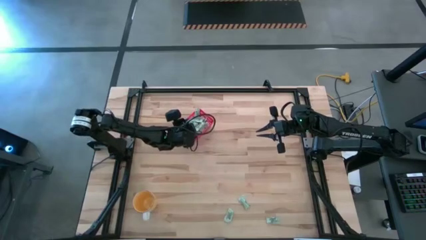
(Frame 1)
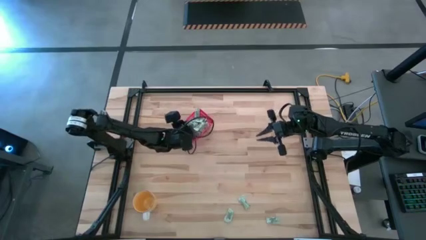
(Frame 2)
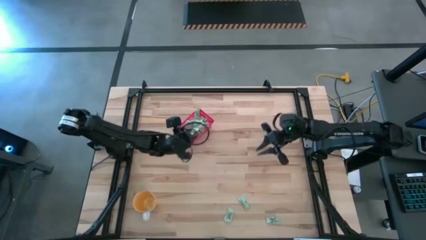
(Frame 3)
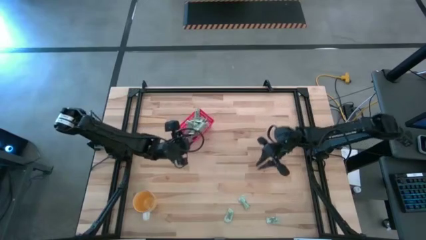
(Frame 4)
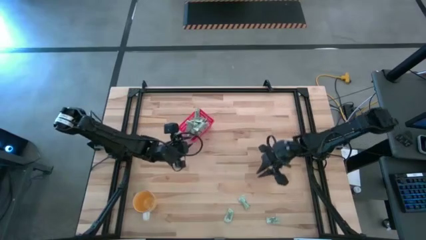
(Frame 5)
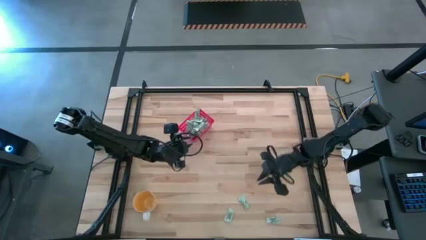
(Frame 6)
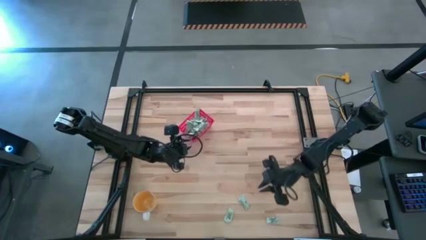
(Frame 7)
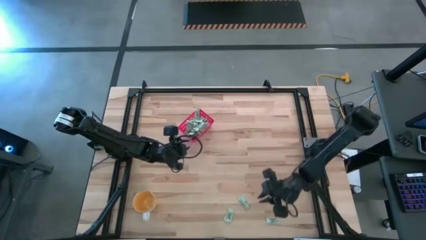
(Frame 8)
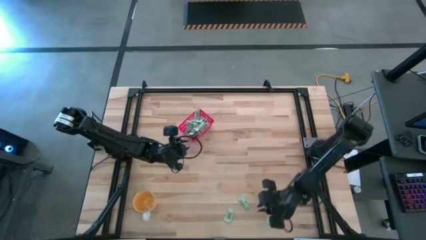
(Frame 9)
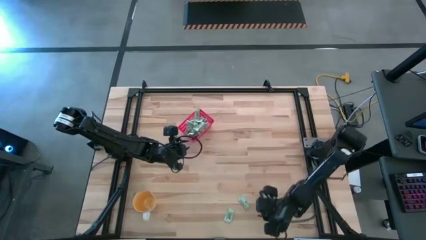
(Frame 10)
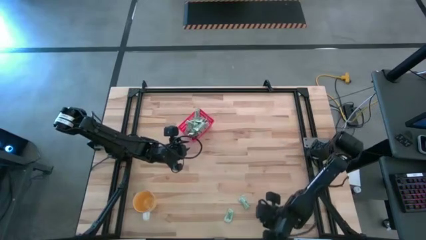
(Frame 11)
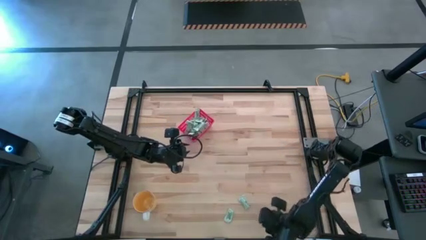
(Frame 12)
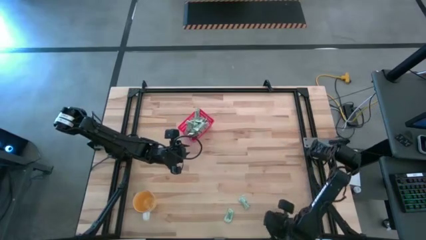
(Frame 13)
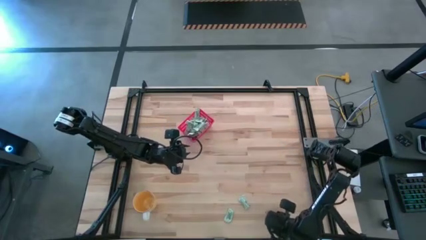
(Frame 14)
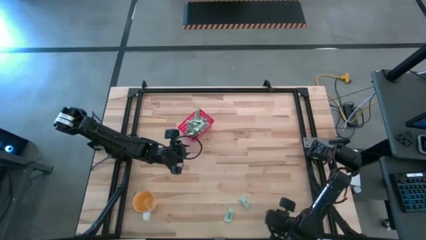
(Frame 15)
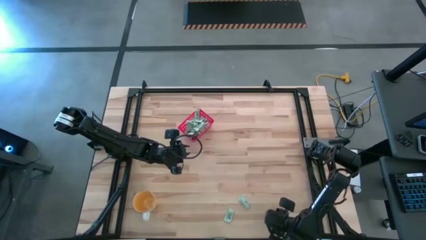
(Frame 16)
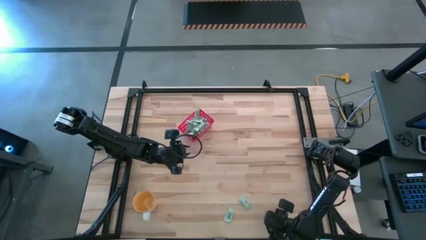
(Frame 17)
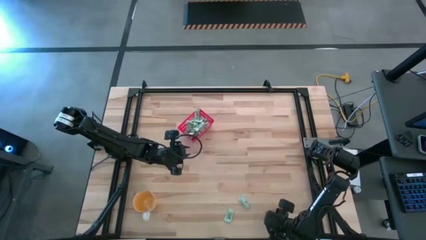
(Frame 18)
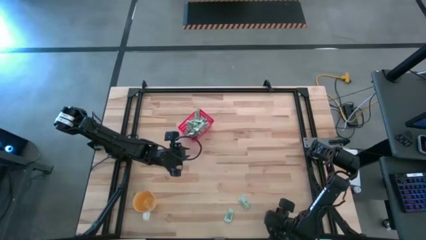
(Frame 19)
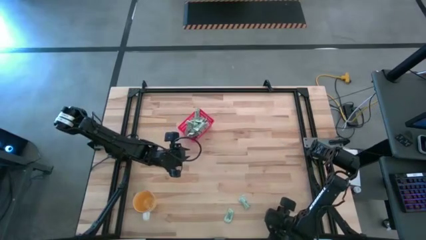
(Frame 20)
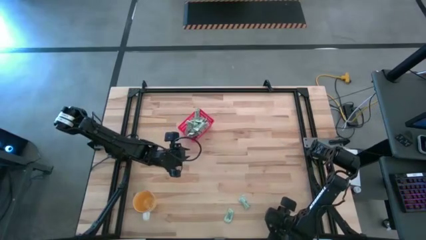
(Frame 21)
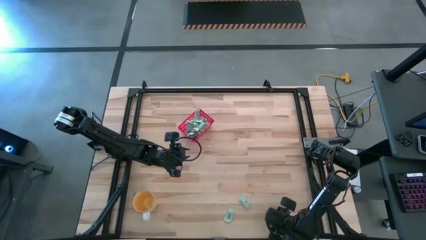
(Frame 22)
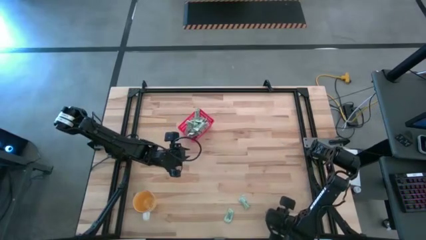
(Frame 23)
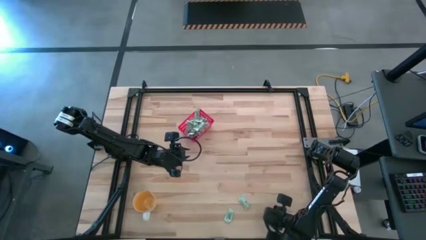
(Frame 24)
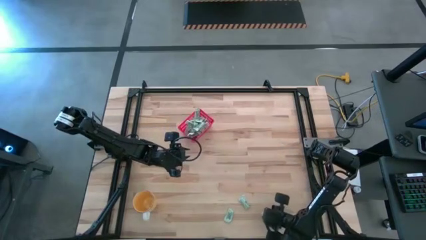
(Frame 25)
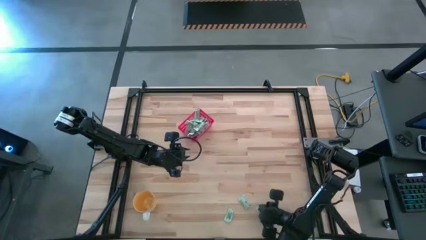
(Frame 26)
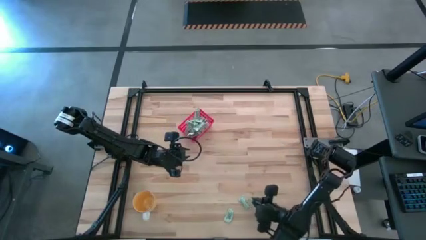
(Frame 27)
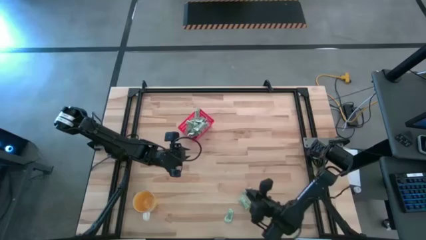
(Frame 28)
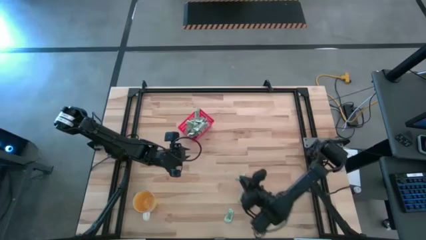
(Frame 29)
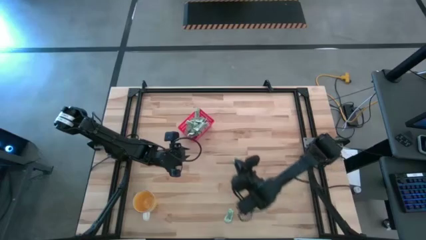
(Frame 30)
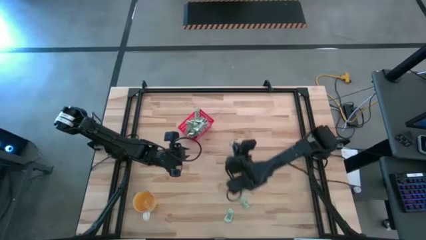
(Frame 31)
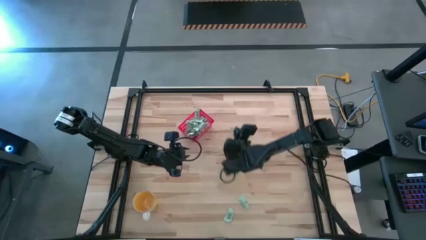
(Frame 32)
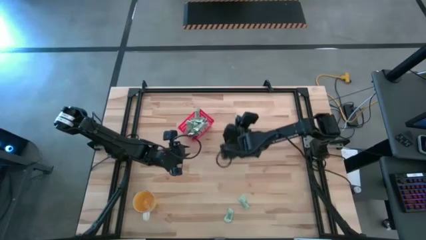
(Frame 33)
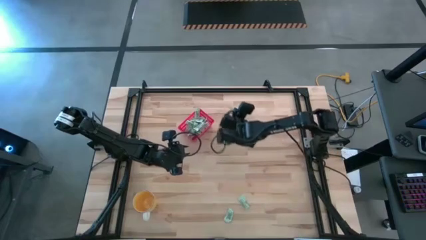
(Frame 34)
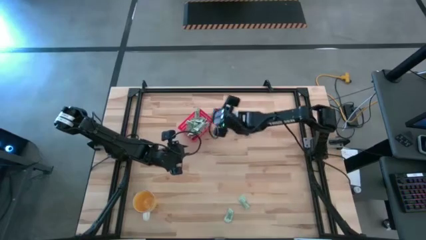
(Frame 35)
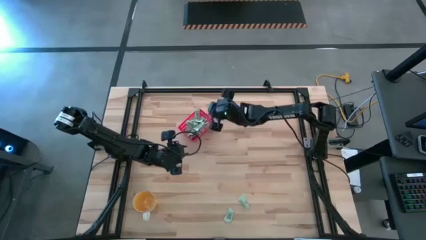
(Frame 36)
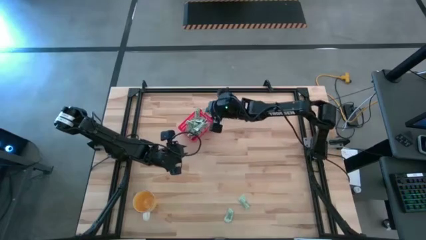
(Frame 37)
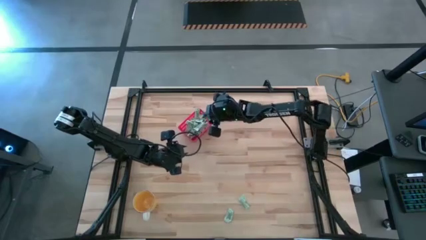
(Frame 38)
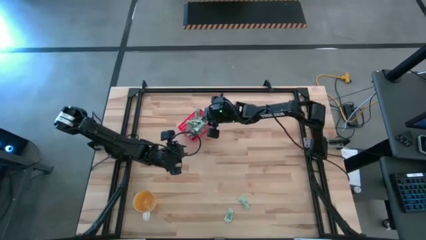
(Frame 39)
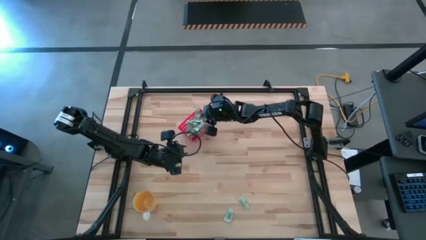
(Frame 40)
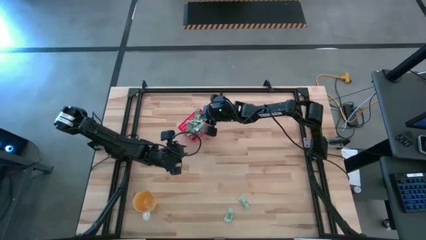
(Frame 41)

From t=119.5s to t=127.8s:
Task: Pick and place Stevia / Truvia into bins
Put the white stevia packet into the red bin

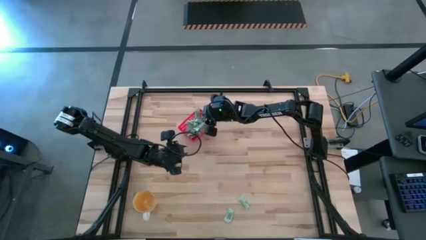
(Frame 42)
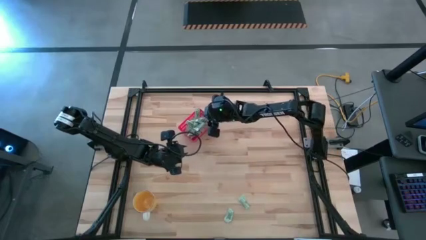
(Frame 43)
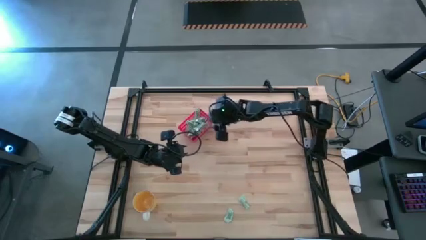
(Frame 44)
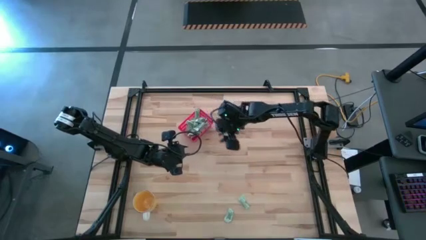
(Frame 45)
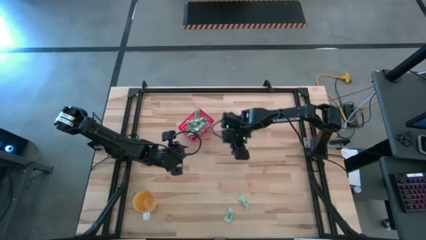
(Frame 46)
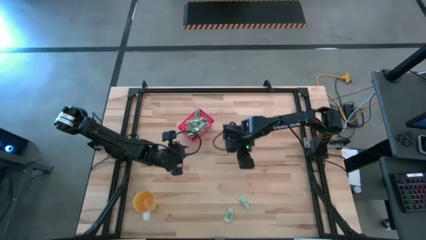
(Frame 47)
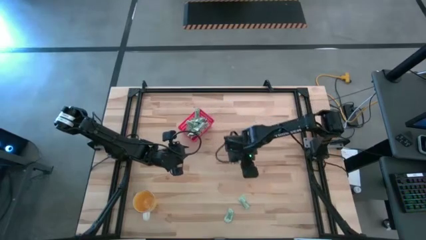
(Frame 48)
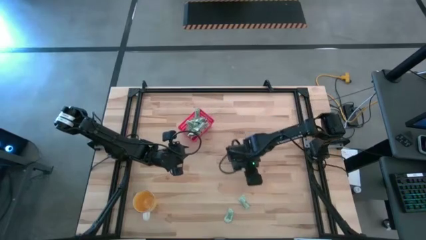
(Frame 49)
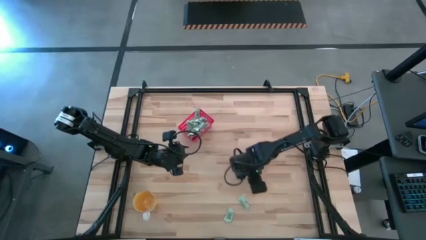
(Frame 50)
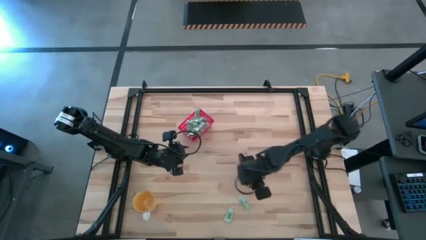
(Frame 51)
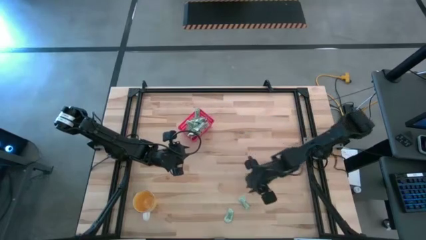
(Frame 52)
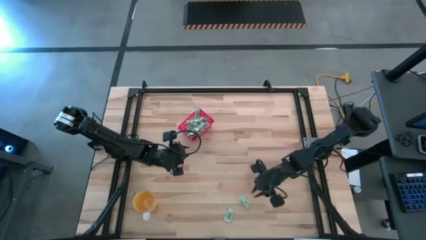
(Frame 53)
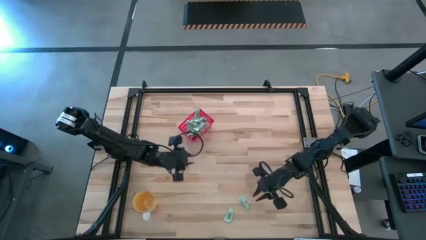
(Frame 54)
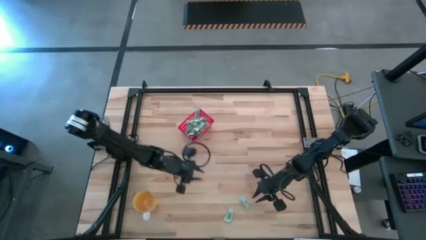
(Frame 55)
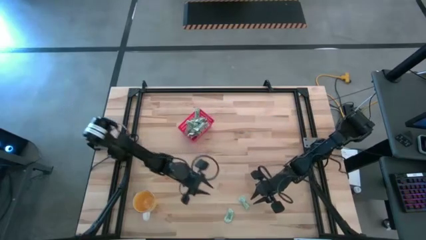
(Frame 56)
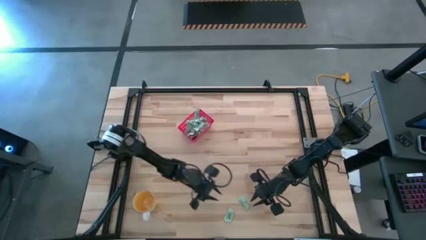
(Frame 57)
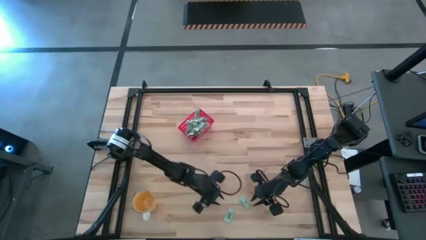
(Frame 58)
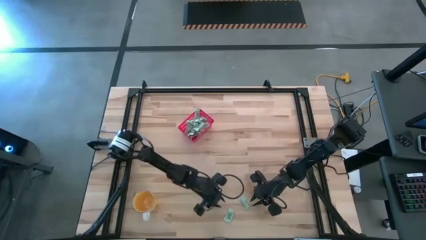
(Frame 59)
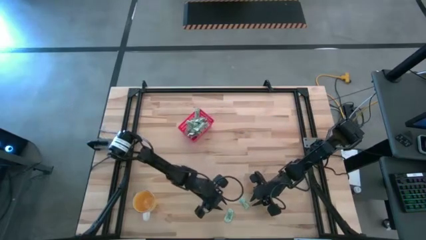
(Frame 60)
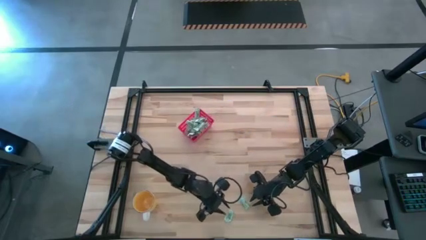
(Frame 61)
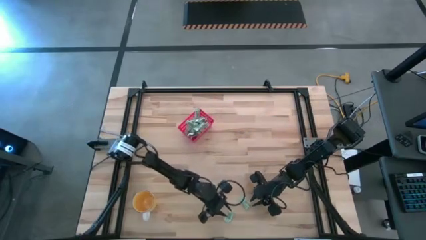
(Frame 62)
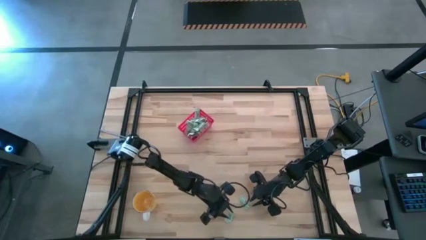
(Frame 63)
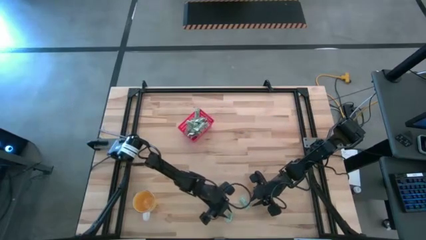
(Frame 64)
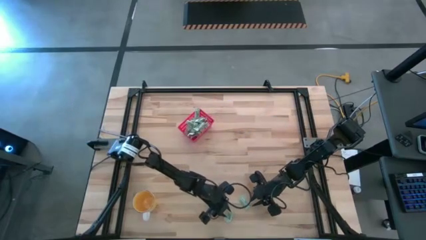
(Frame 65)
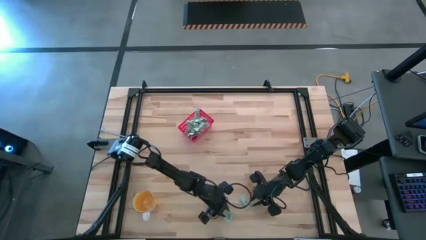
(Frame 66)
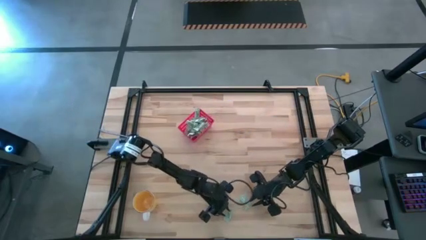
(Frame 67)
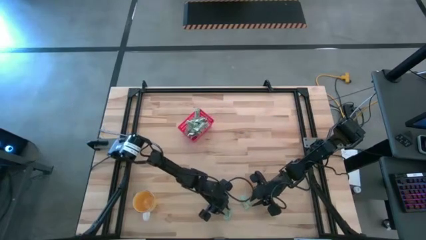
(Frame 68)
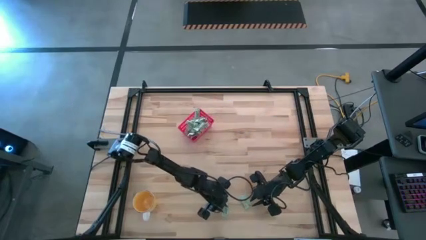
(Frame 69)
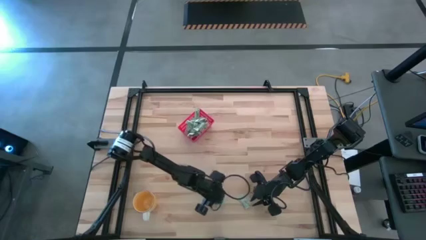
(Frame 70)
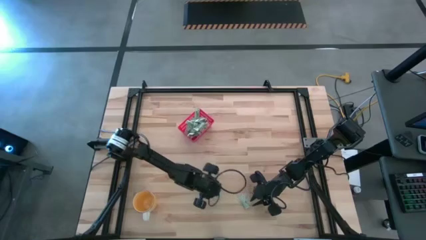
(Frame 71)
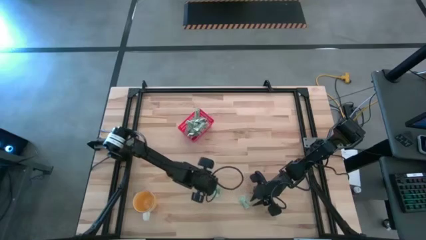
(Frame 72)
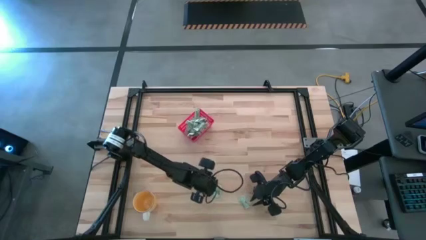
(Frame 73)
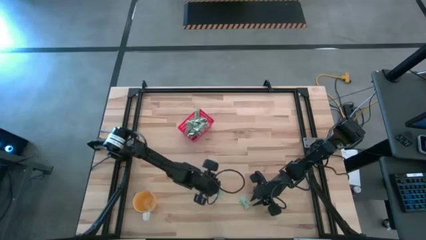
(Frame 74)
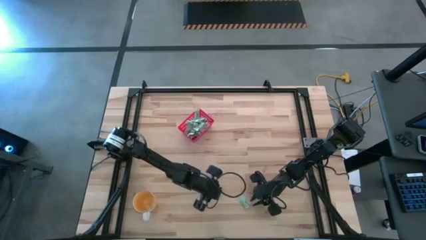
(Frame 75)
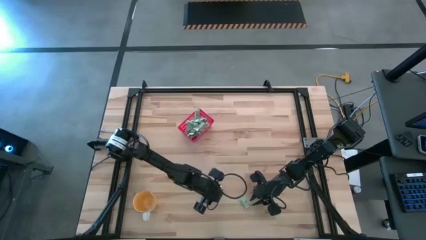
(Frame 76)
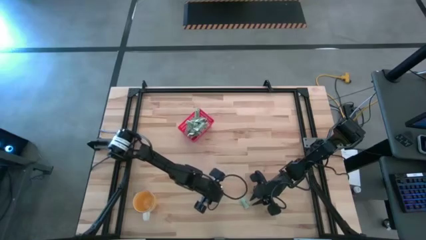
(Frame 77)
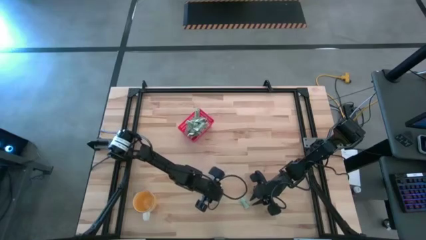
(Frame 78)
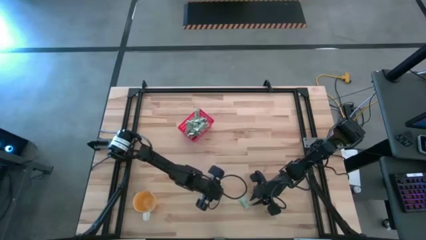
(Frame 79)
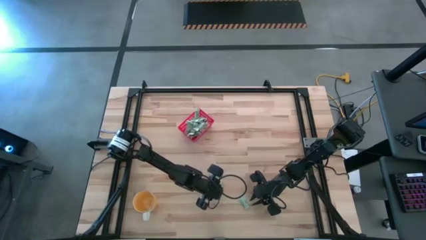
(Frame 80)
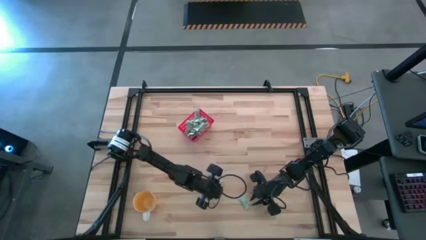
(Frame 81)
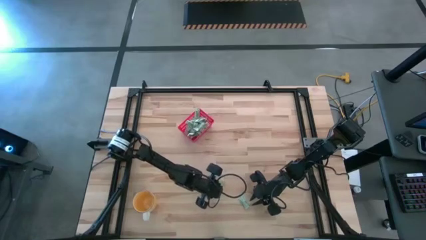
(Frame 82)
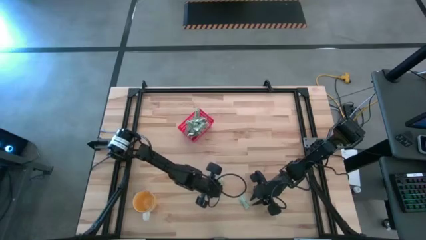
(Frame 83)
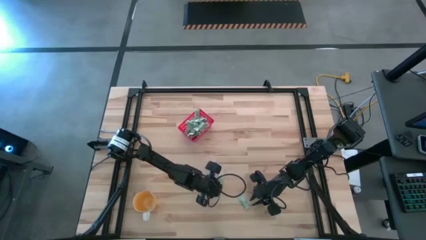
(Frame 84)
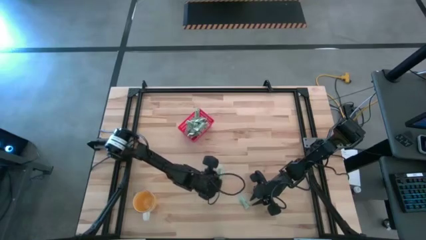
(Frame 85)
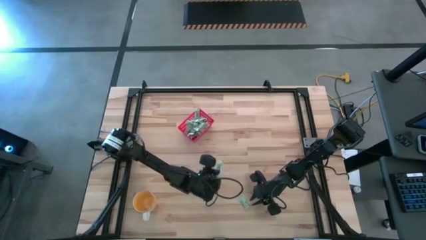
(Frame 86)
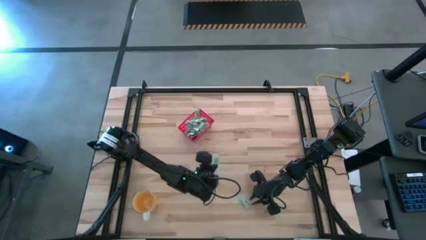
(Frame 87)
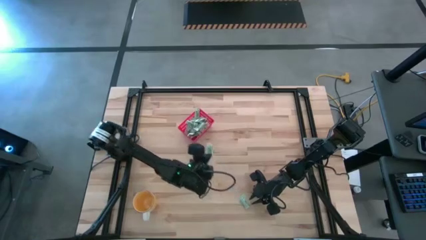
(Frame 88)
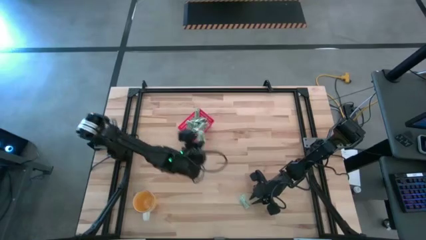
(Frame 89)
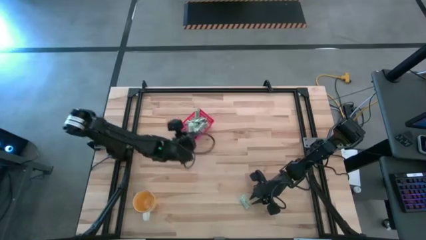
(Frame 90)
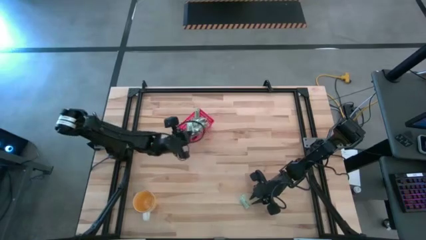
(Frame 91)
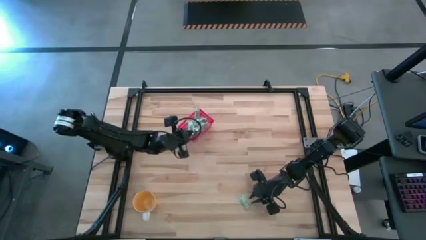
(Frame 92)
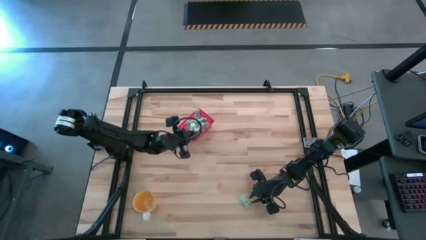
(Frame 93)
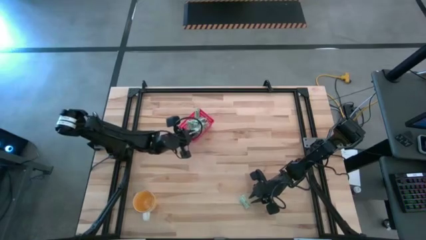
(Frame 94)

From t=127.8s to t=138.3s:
Put the white stevia packet into the red bin
